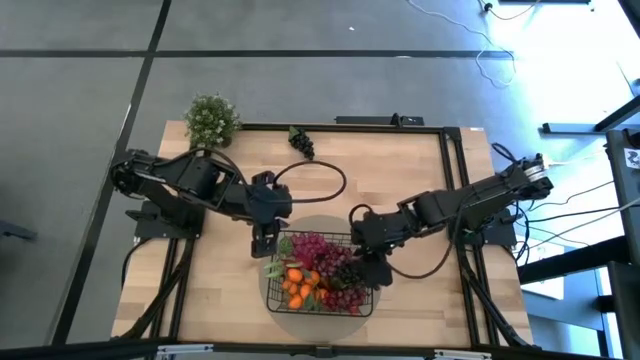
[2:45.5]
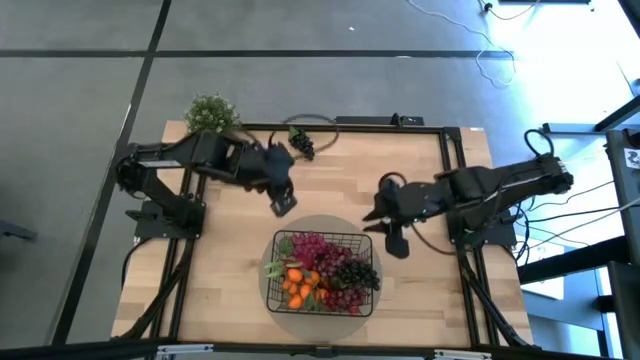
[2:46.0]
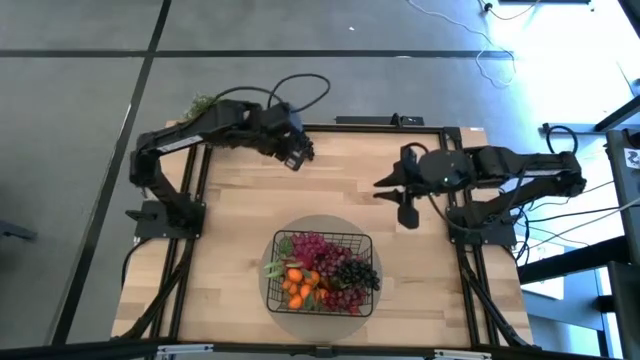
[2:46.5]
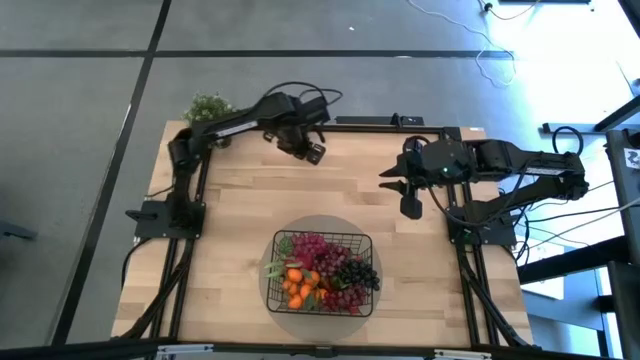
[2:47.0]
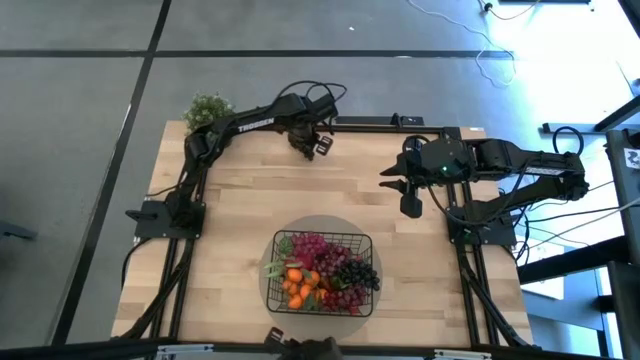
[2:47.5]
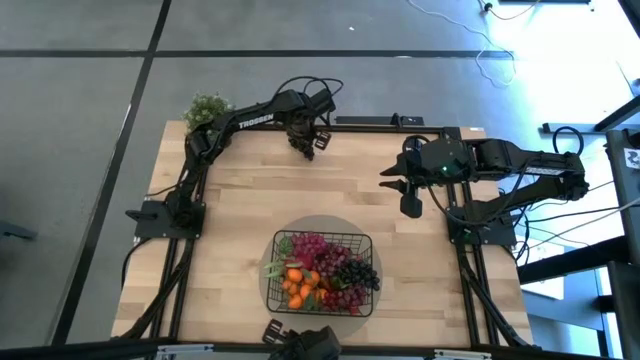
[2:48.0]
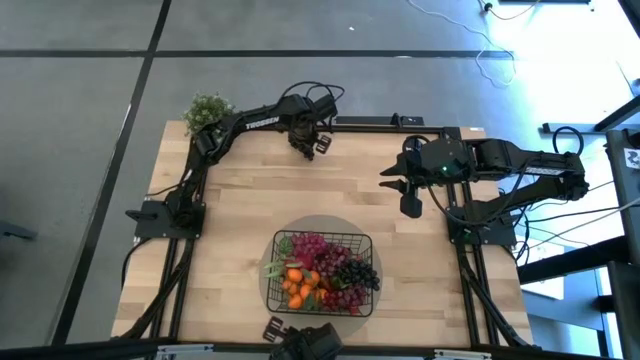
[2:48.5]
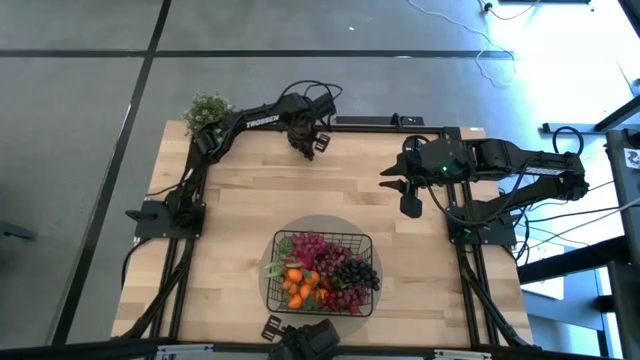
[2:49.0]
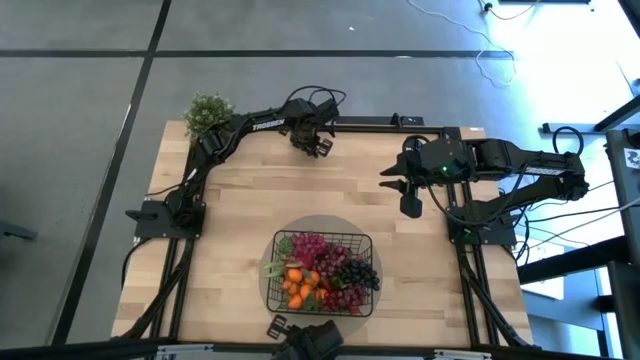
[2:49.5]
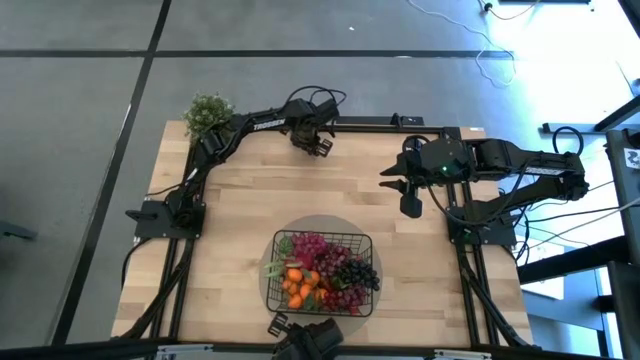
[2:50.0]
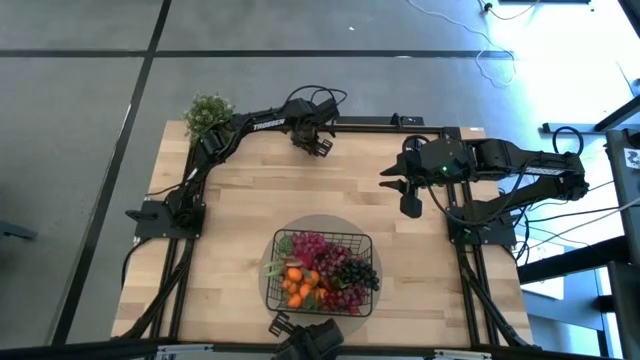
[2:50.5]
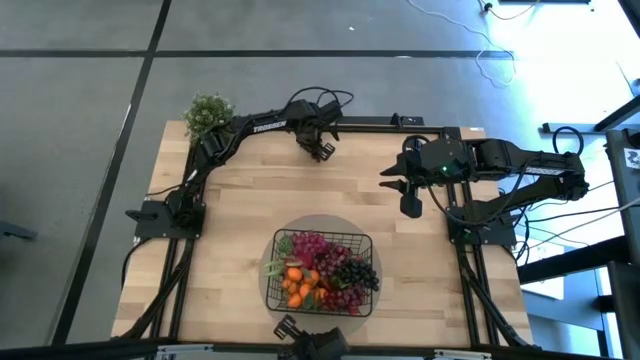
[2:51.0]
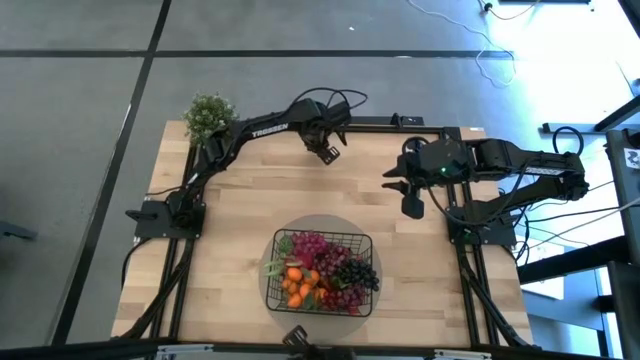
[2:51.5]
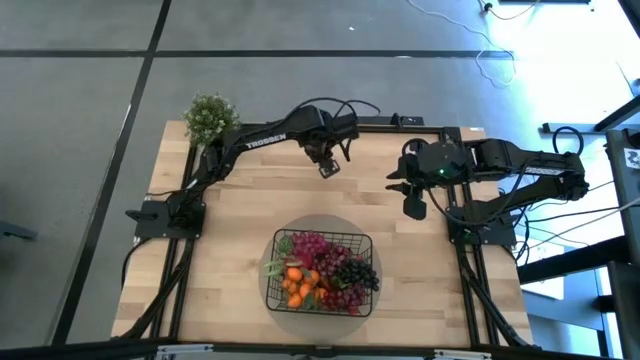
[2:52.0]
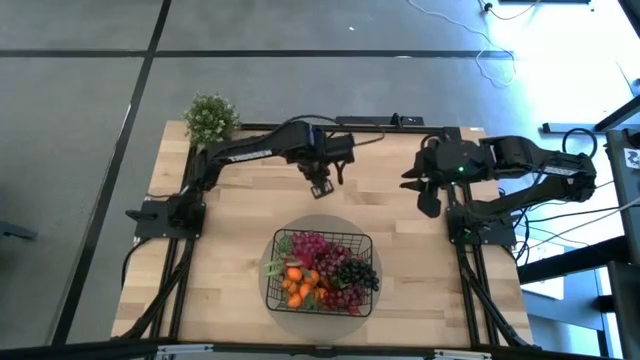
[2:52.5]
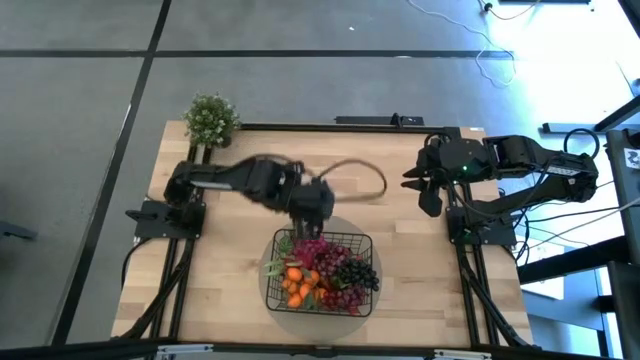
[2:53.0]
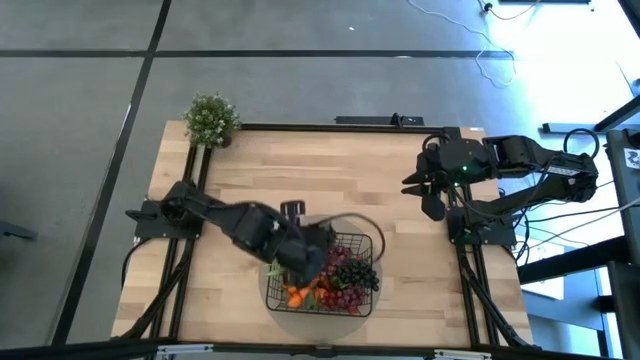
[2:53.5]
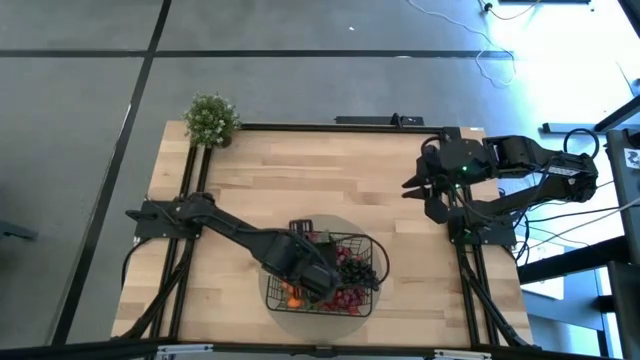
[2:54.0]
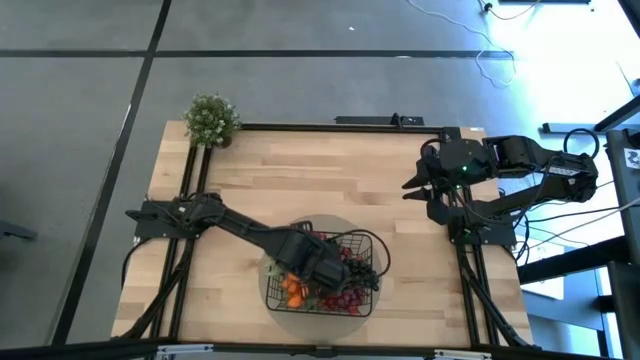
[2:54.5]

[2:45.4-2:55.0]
Task: Build produce basket
Put the purple grapes into the black wire basket

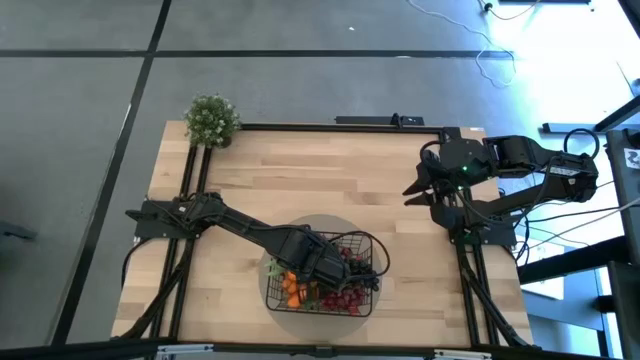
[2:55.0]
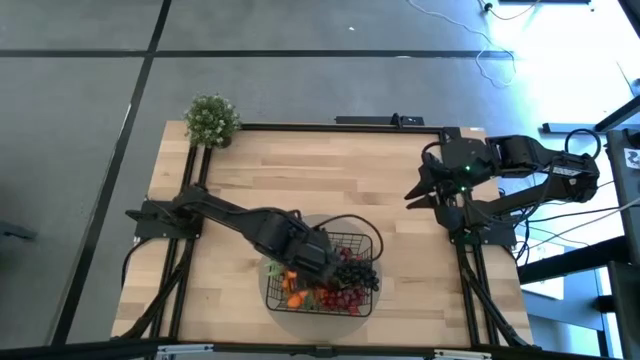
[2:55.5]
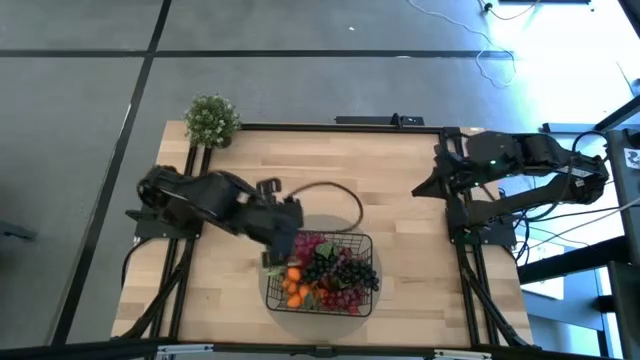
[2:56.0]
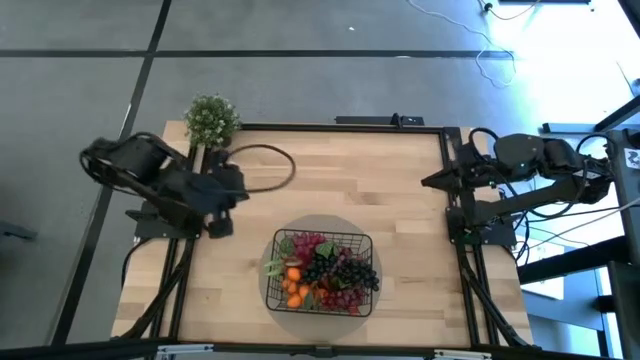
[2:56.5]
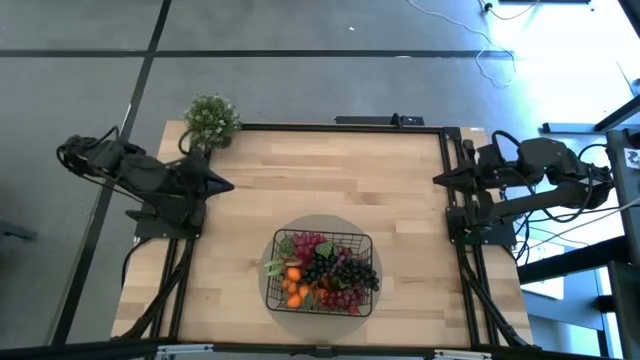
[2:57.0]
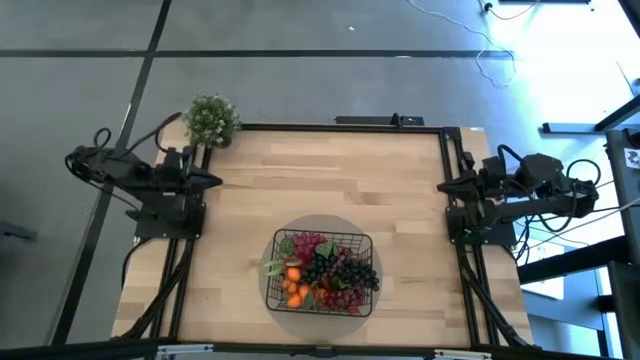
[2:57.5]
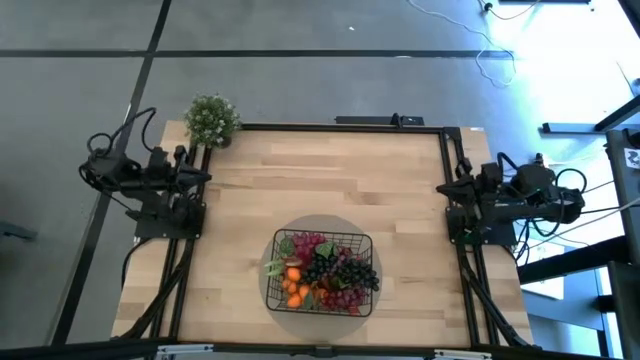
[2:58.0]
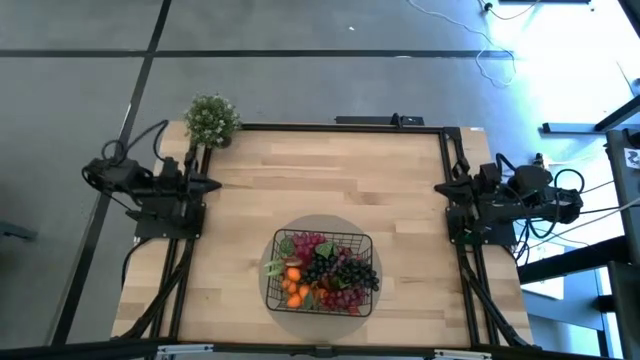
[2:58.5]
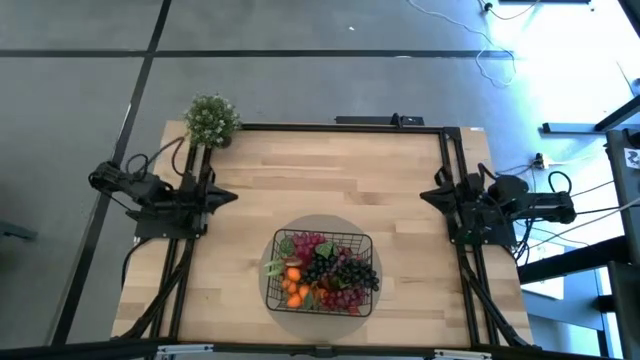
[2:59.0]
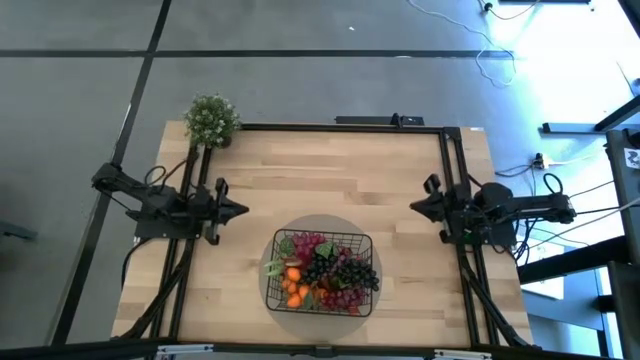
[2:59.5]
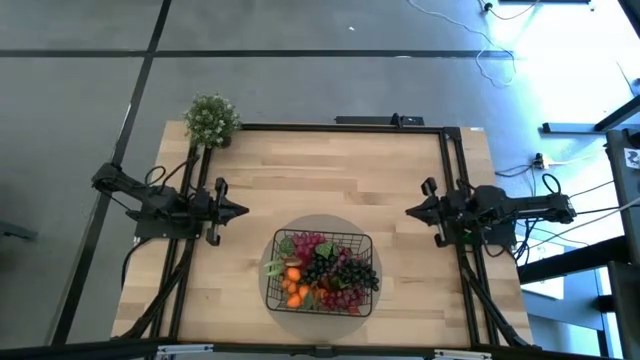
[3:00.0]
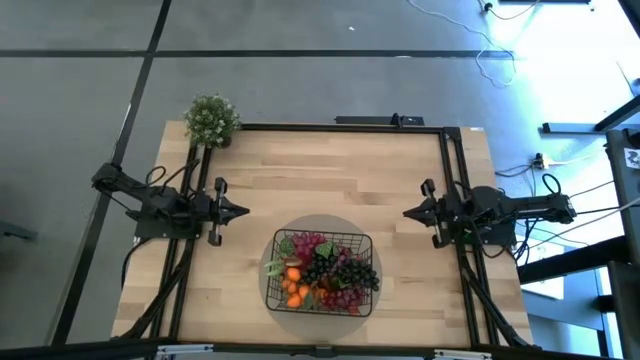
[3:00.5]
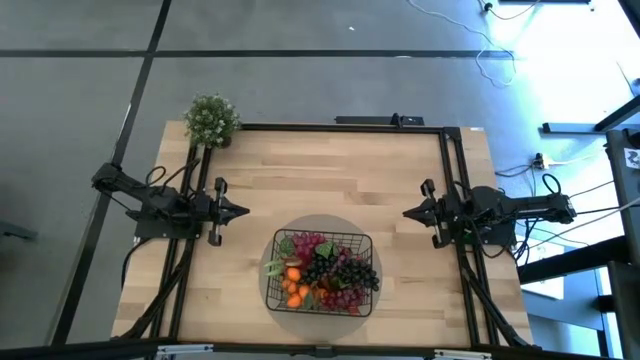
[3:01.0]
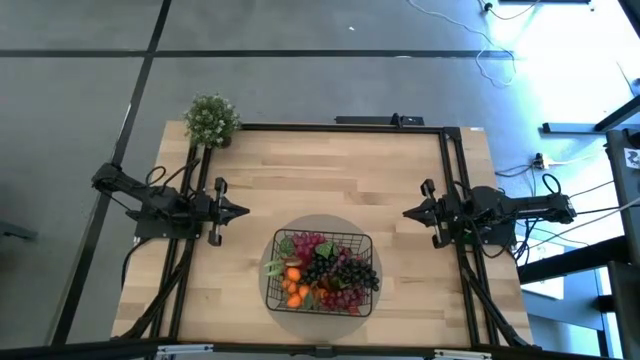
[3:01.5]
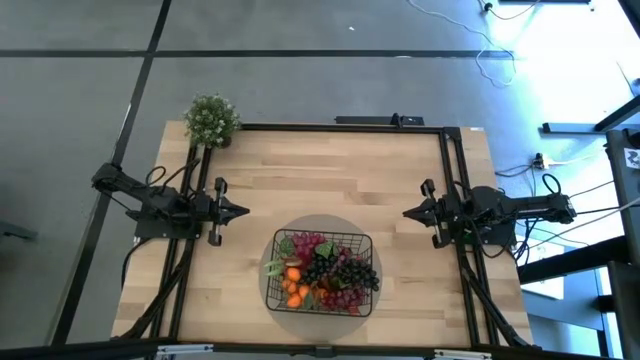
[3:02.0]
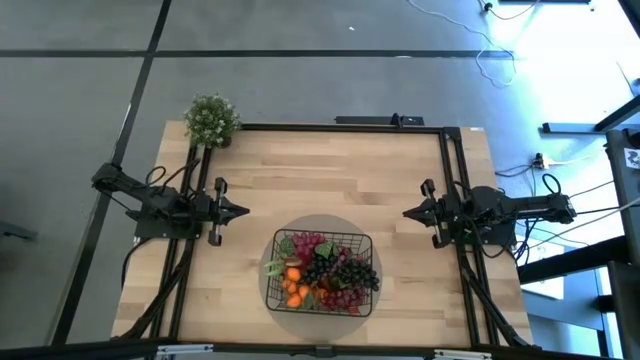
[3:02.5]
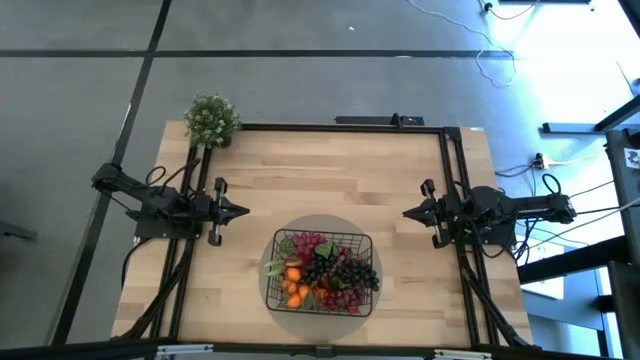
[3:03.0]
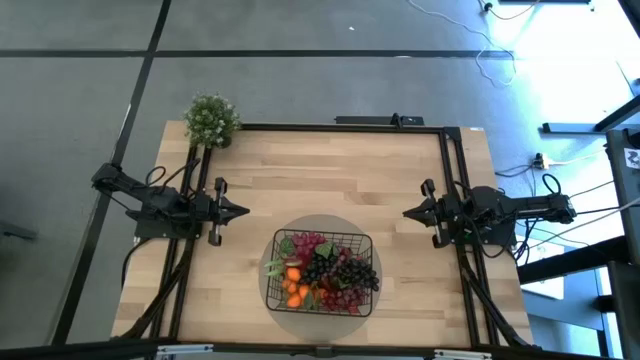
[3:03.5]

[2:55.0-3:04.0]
Return to Home Position

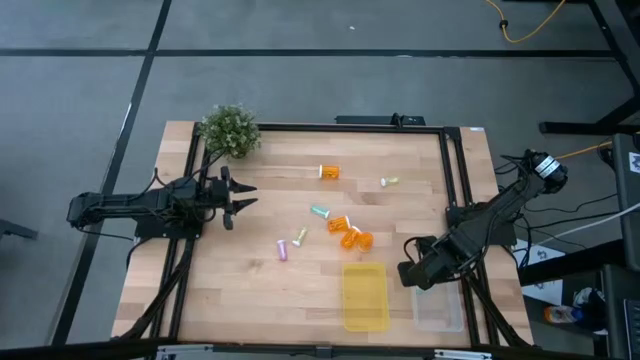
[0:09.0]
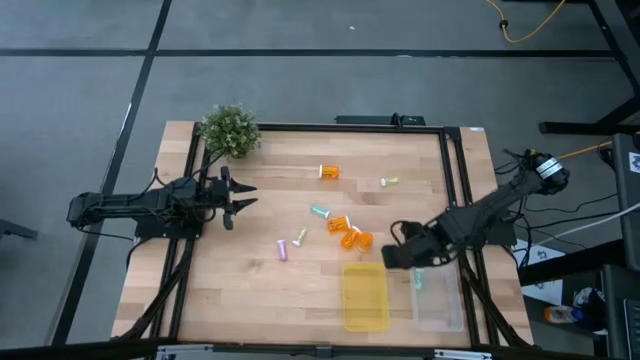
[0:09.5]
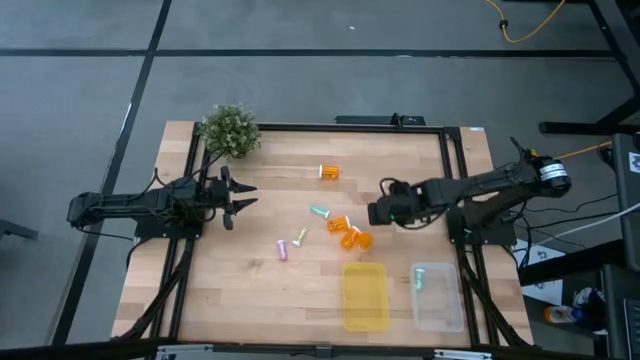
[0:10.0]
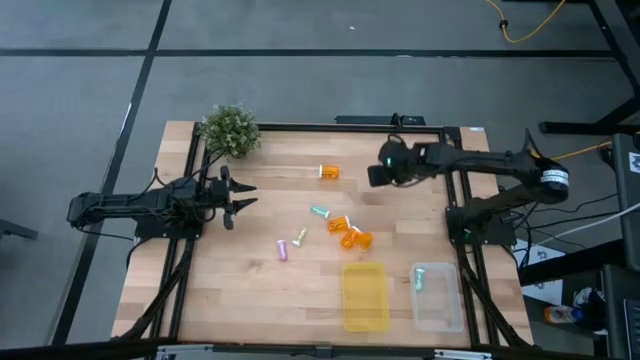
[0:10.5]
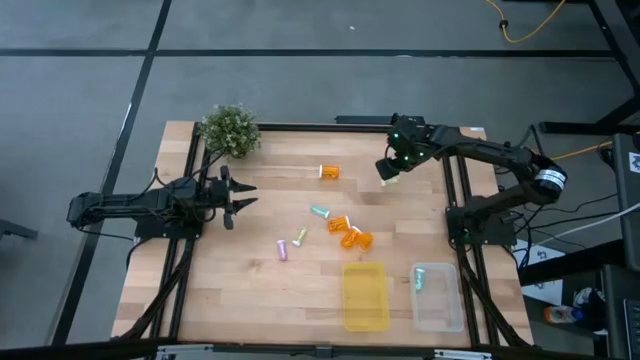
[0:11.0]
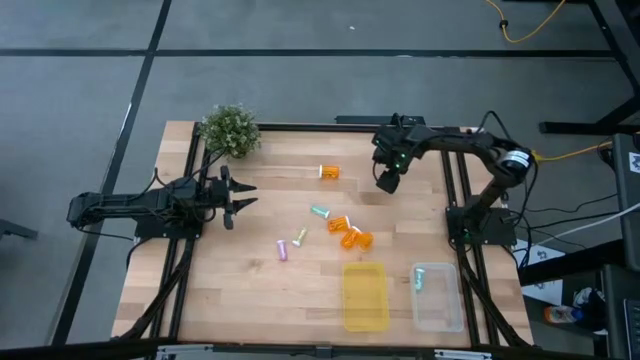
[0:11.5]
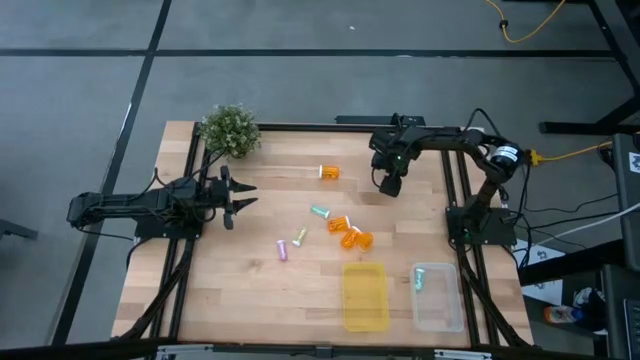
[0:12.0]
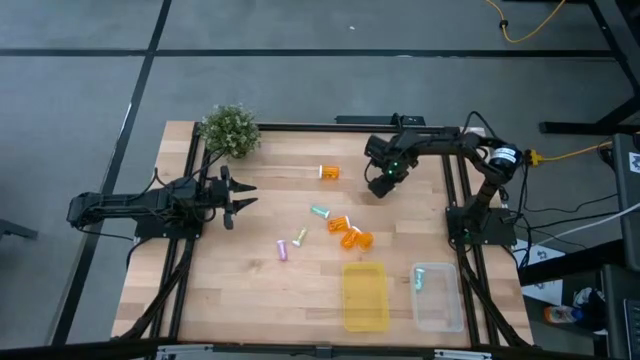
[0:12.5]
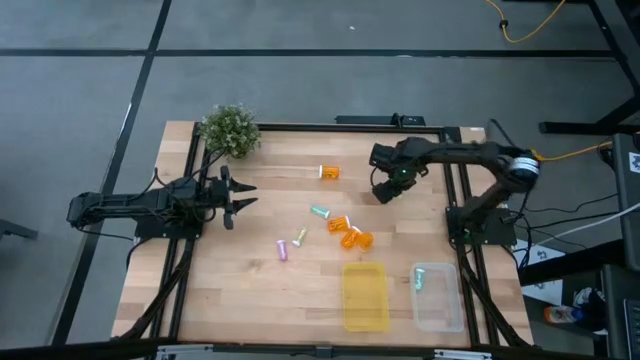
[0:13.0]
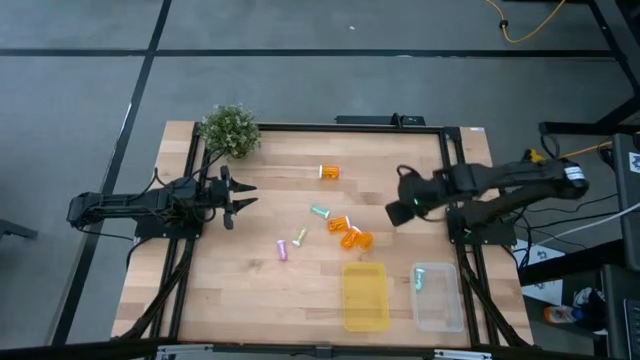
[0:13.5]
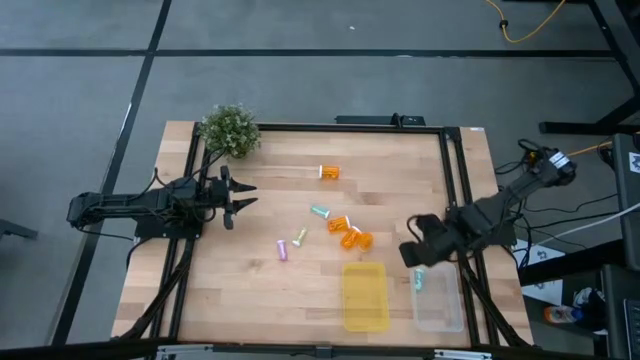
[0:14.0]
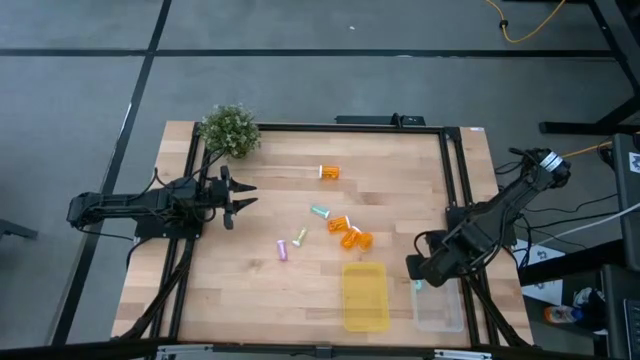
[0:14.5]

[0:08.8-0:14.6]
Task: Pick and place medicine bottles into bin by pill shape (circle, oval)
Put the yellow tablet bottle into the transparent bin
